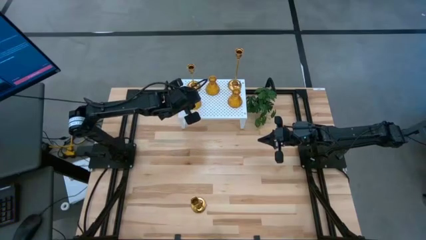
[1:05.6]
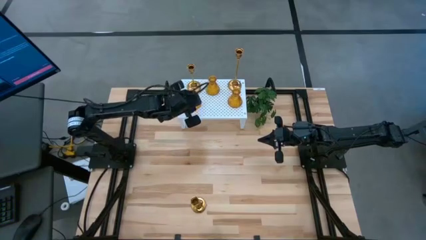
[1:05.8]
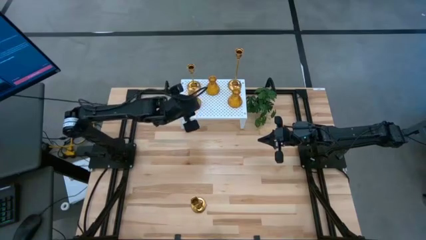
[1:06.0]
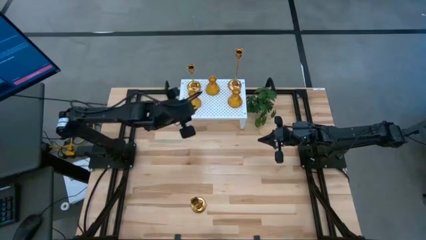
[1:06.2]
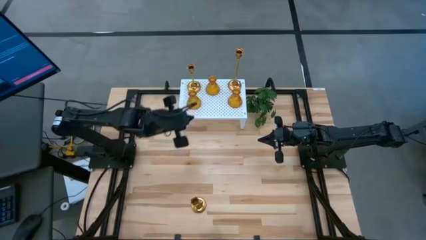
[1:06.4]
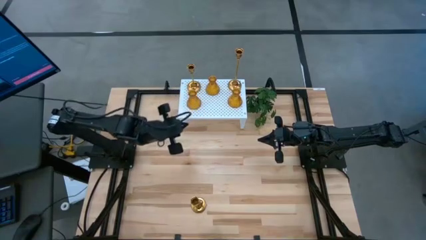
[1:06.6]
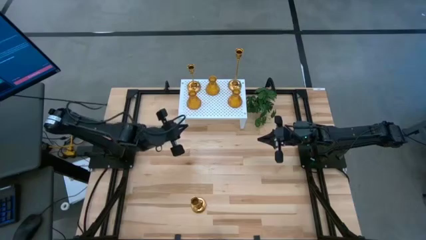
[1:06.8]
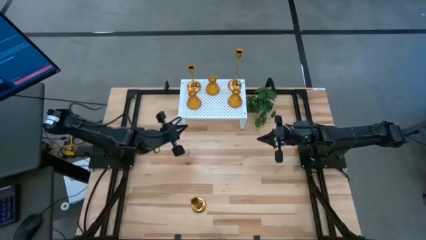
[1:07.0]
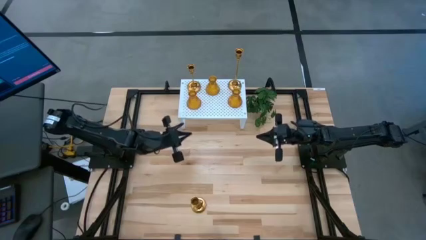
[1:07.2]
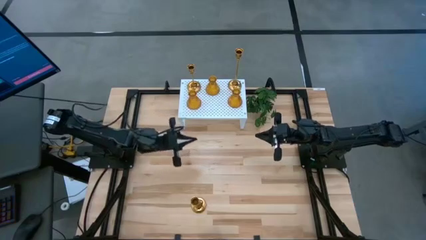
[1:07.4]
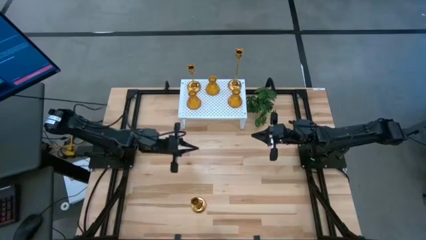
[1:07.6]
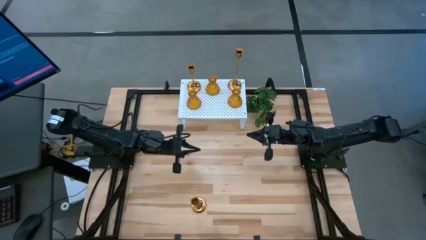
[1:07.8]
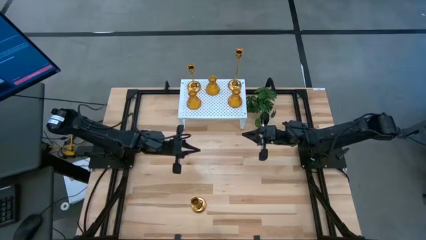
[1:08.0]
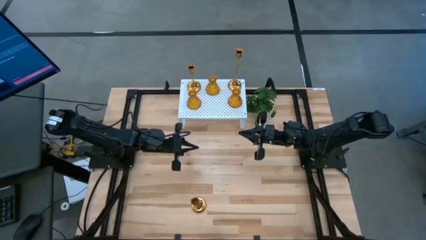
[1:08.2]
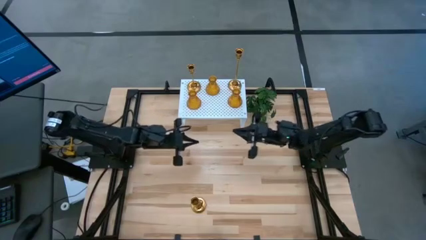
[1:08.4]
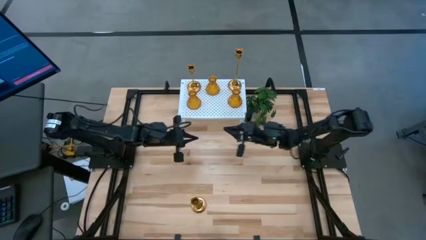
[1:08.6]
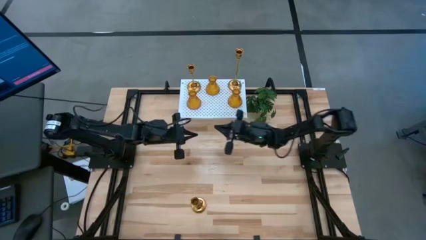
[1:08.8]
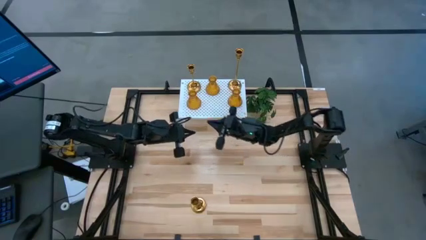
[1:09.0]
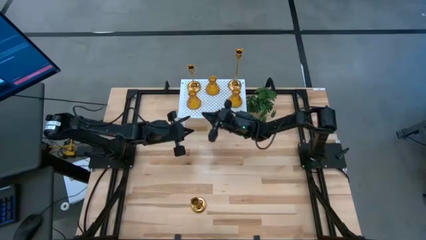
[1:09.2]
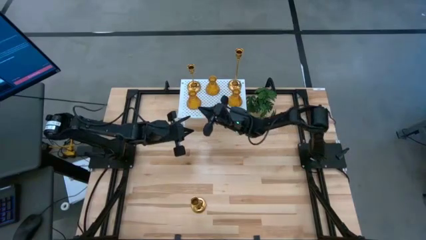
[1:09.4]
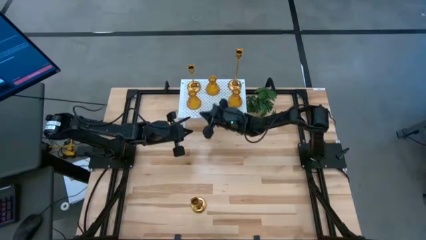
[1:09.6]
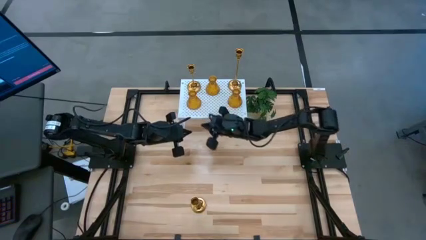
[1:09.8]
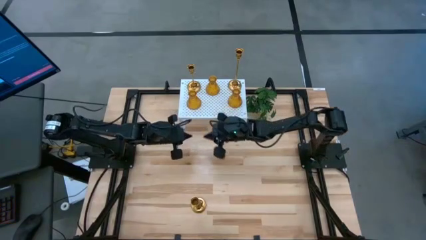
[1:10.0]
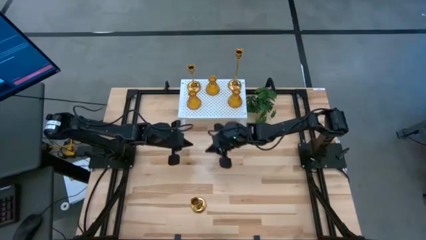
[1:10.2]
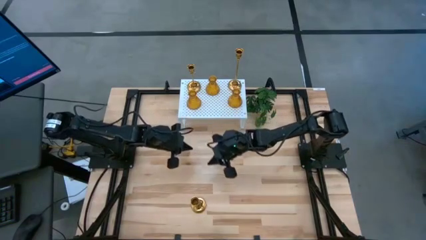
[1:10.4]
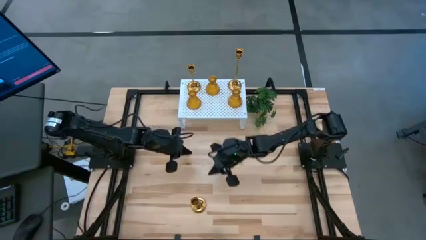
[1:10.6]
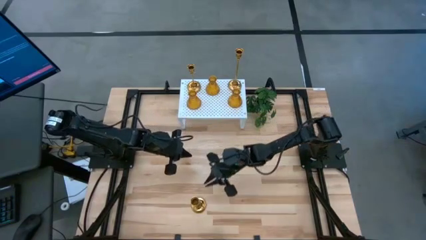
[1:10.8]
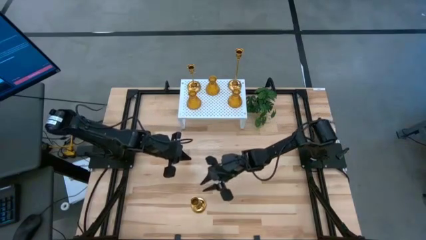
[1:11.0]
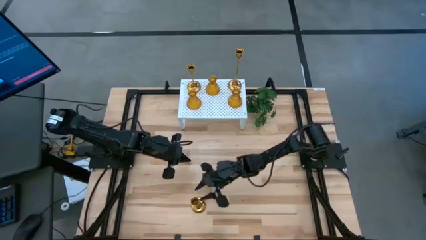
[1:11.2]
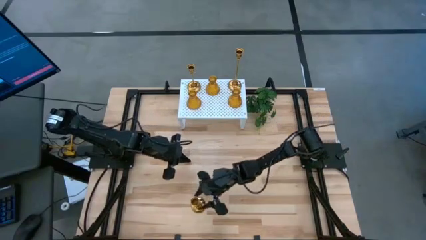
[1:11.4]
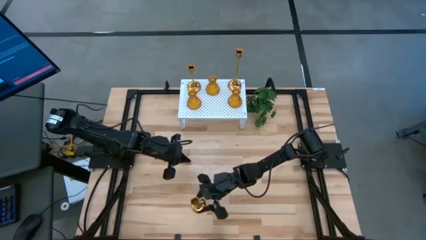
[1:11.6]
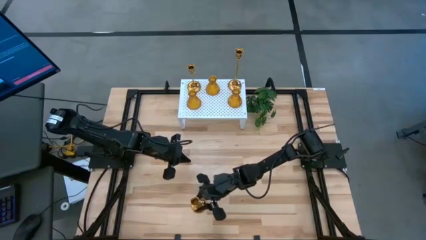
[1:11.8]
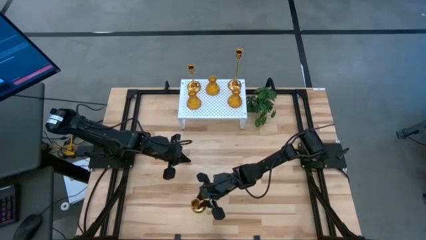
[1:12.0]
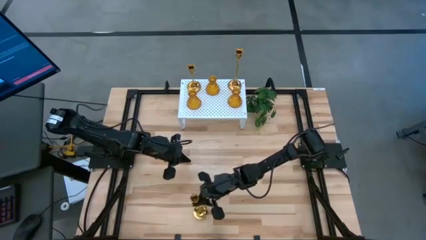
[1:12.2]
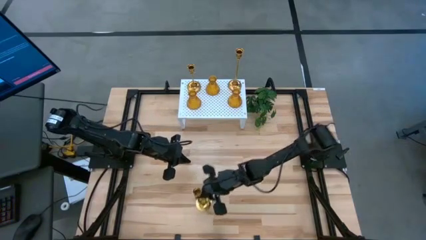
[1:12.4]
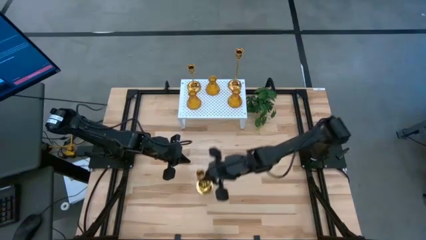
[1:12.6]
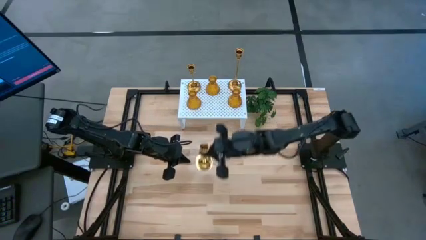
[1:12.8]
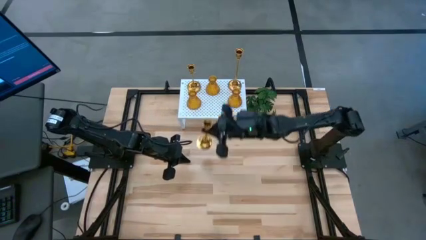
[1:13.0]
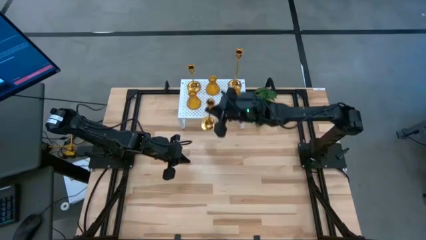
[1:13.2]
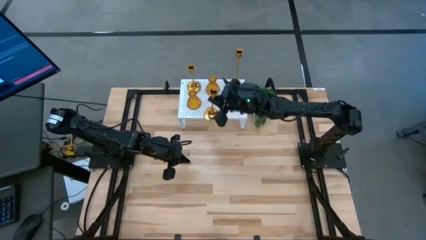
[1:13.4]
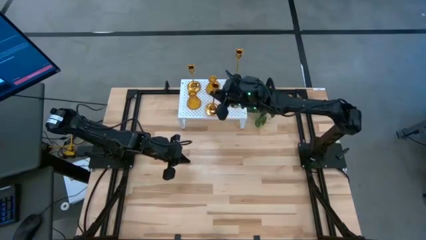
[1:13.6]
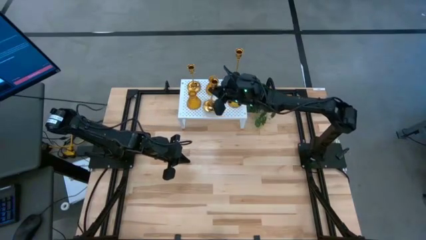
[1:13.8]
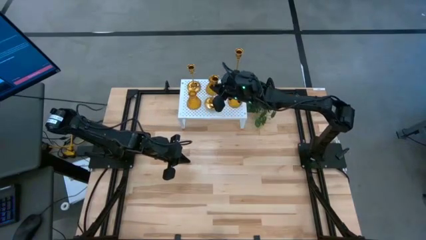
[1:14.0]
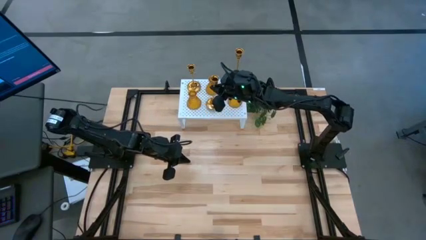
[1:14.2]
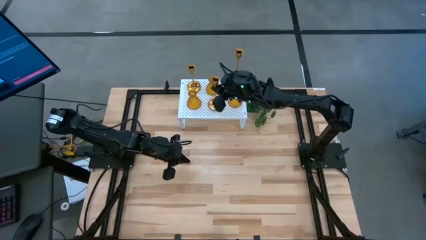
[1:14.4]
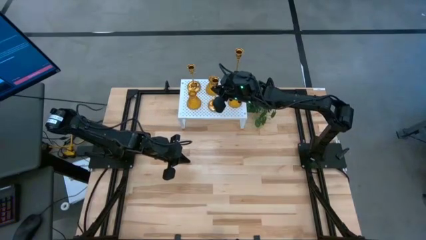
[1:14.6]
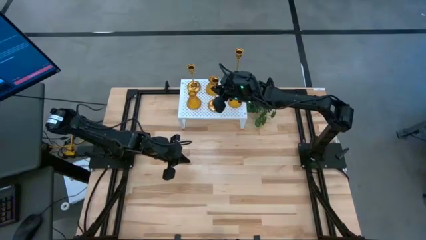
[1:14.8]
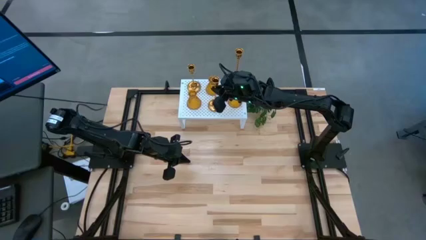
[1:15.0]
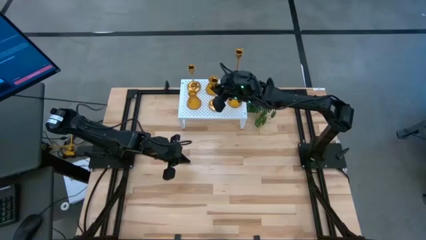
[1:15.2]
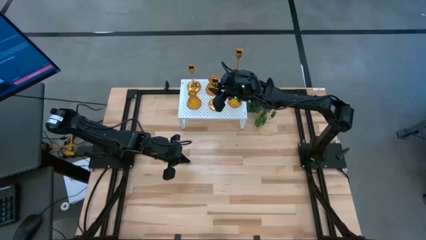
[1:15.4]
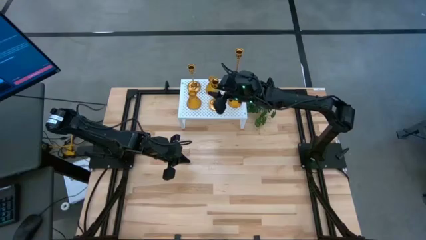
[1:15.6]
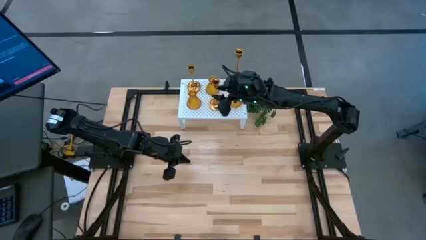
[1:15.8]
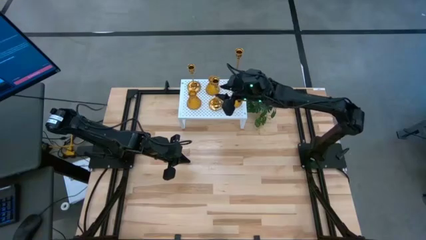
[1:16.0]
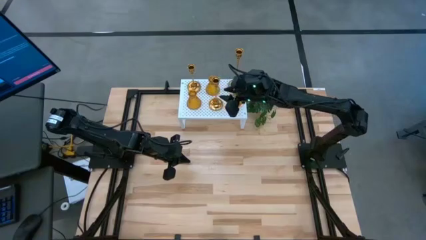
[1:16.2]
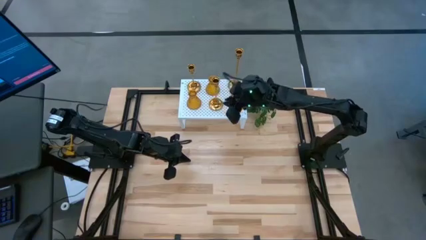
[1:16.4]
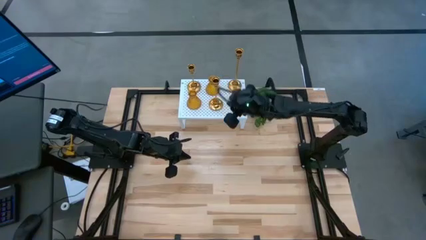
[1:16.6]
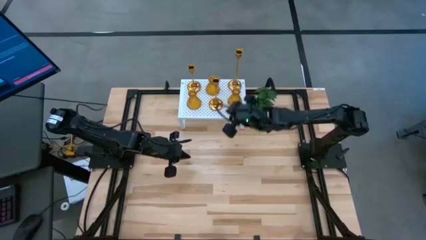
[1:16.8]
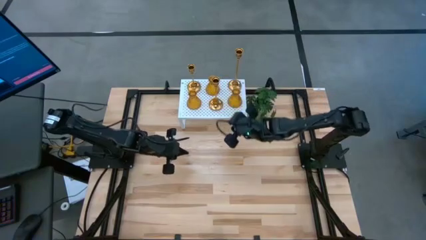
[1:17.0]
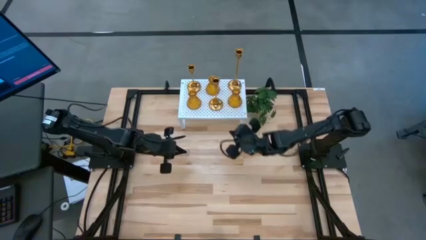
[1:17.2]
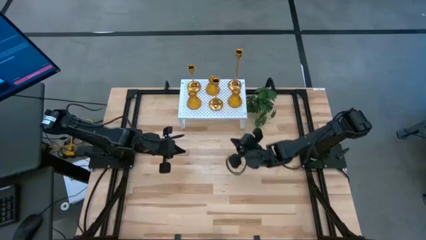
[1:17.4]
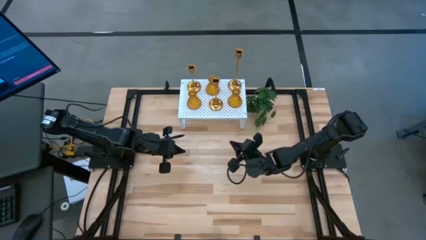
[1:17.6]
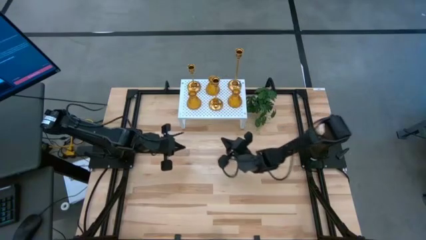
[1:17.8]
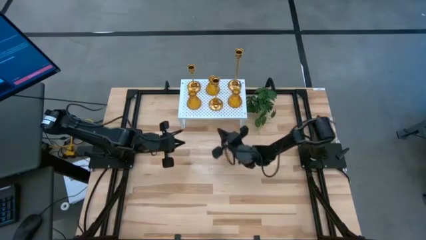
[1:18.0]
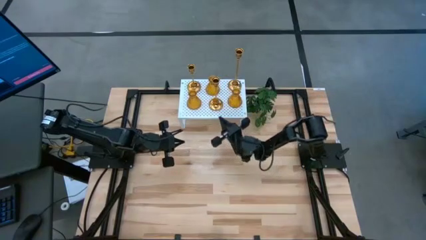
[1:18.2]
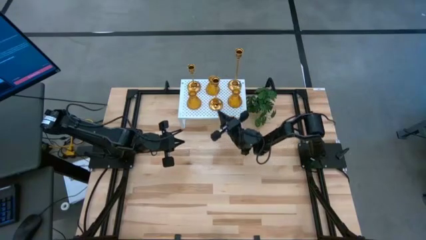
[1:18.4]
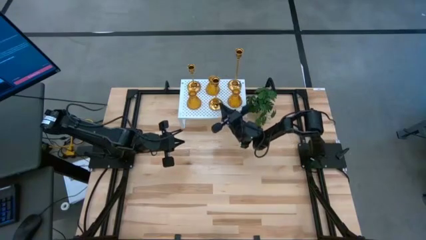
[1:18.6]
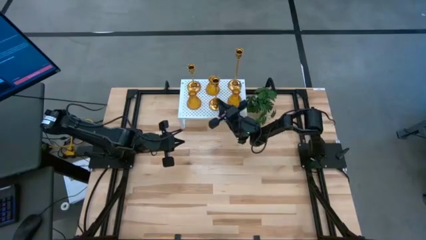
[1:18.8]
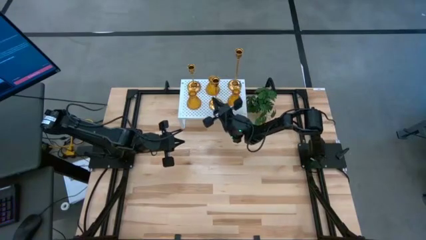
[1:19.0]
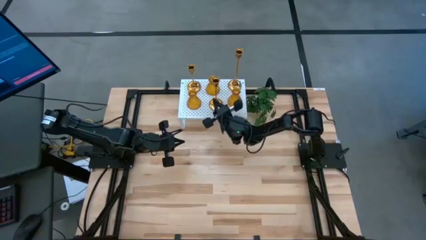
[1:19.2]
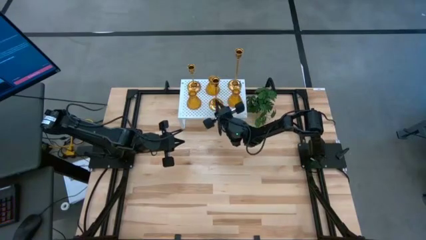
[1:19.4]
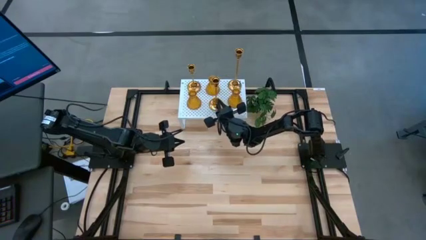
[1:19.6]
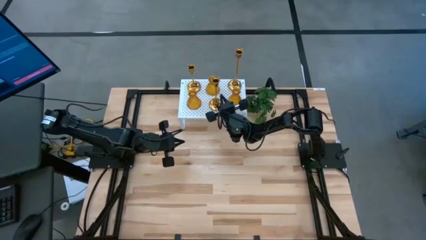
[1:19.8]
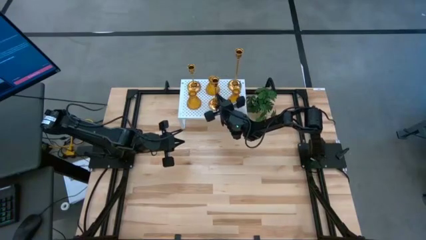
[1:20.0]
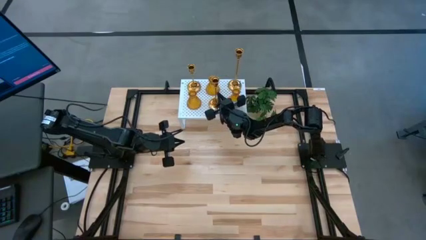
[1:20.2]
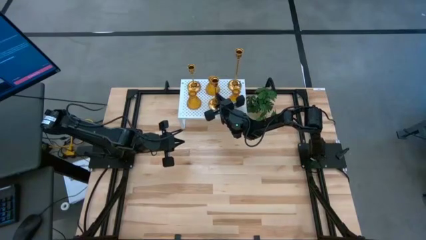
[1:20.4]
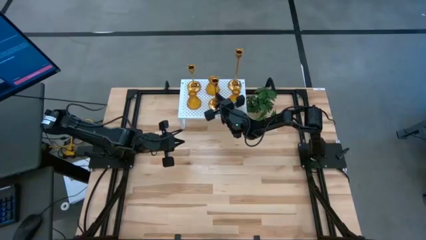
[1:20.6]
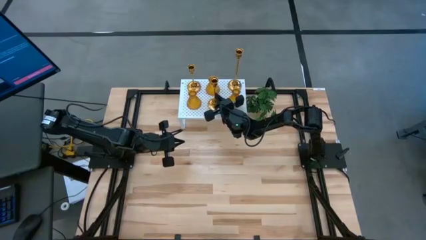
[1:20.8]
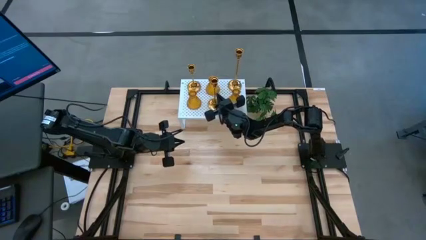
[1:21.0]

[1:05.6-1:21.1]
Task: Pick & Place candle stick holders
Put the gold candle holder on the shelf
